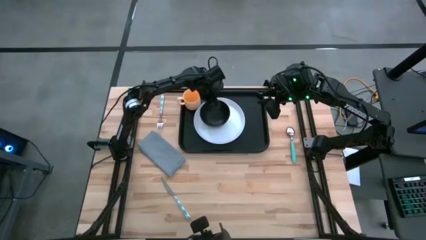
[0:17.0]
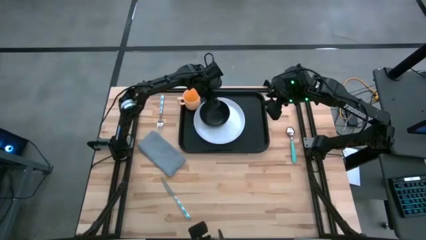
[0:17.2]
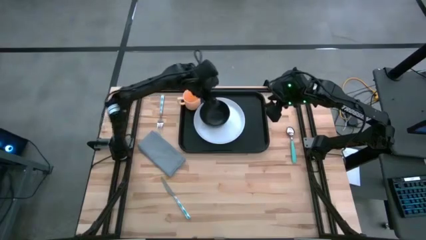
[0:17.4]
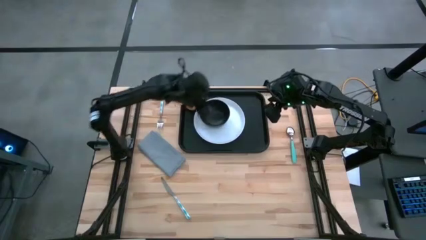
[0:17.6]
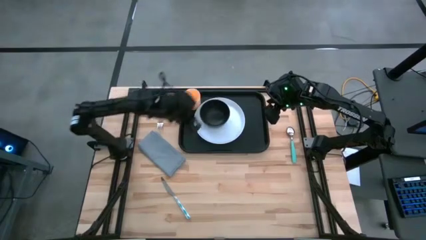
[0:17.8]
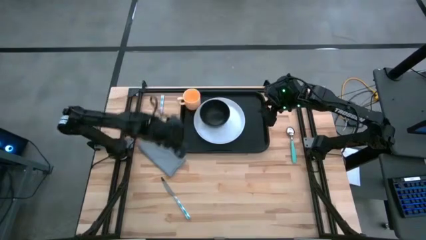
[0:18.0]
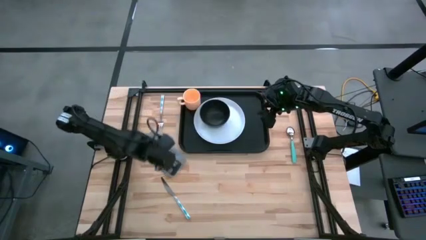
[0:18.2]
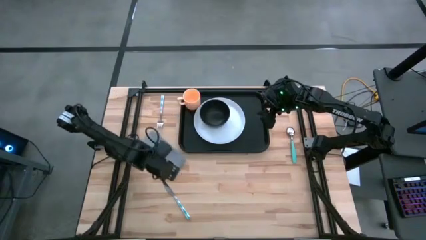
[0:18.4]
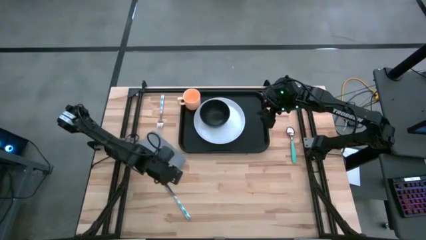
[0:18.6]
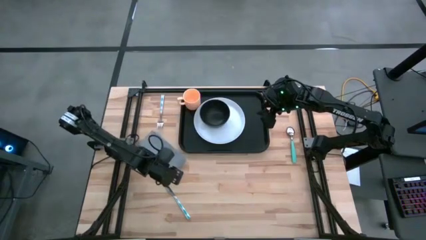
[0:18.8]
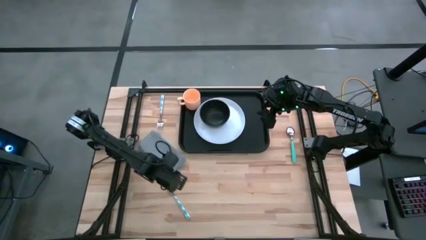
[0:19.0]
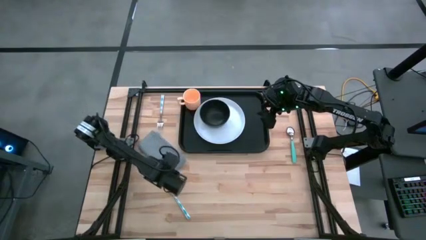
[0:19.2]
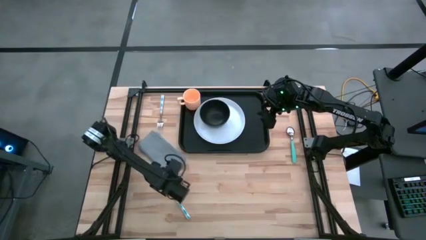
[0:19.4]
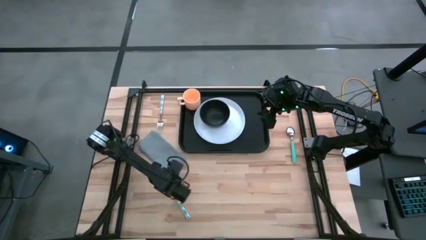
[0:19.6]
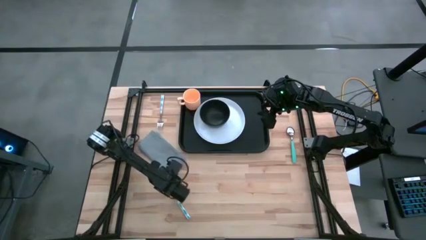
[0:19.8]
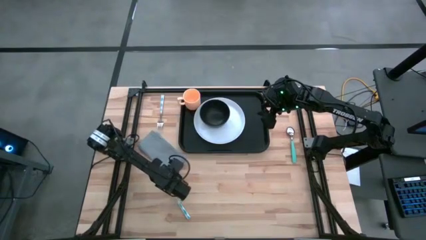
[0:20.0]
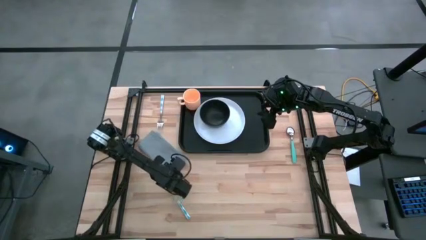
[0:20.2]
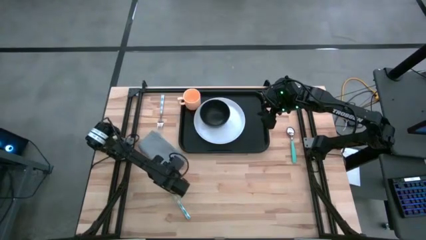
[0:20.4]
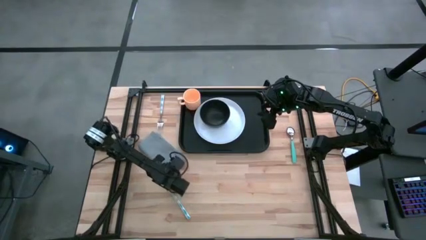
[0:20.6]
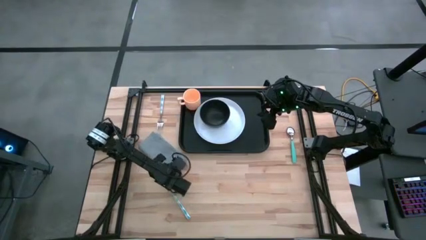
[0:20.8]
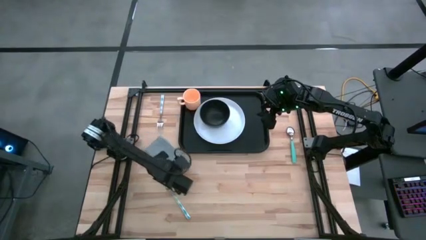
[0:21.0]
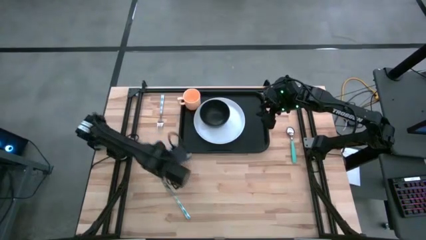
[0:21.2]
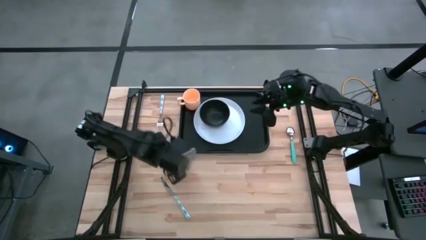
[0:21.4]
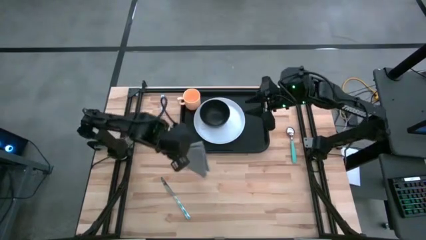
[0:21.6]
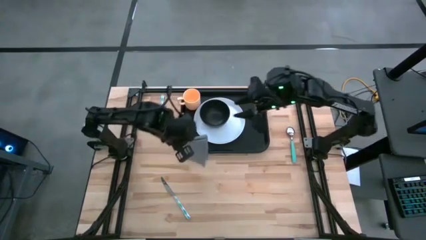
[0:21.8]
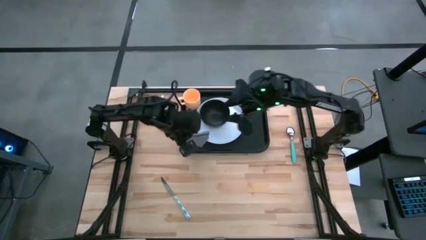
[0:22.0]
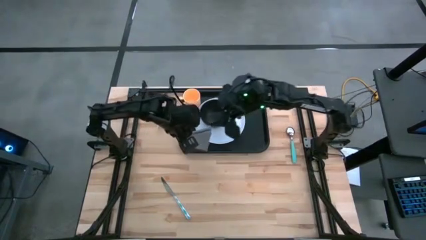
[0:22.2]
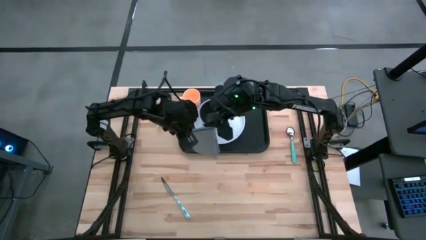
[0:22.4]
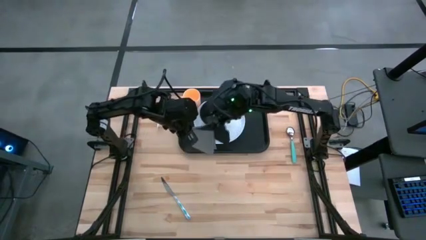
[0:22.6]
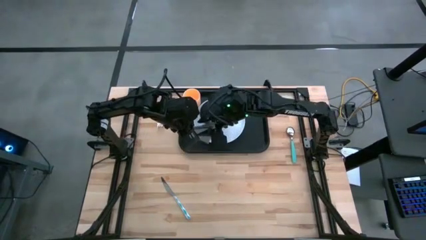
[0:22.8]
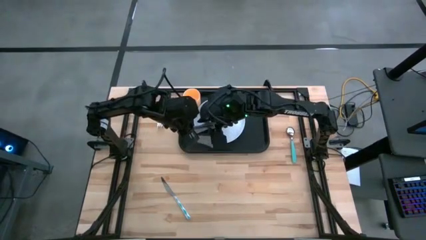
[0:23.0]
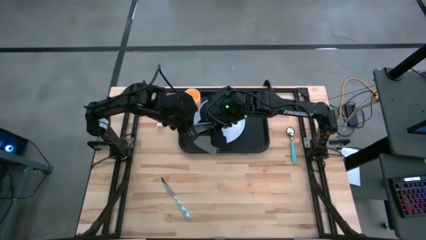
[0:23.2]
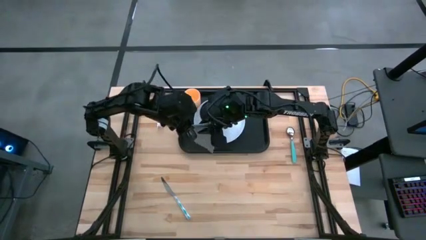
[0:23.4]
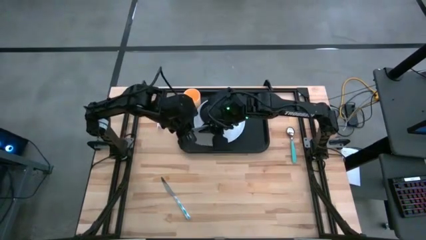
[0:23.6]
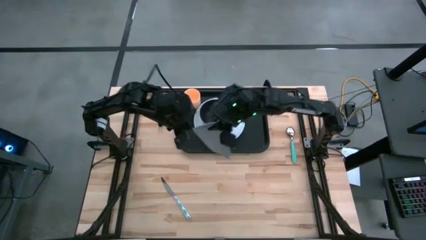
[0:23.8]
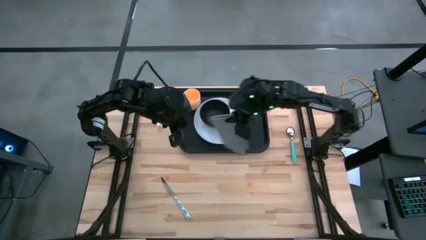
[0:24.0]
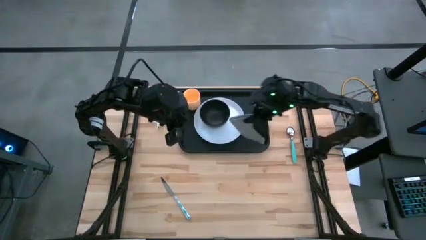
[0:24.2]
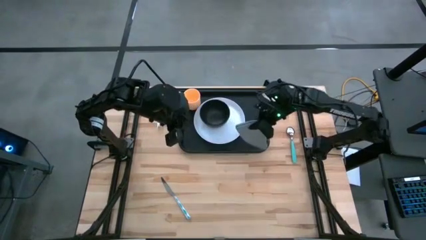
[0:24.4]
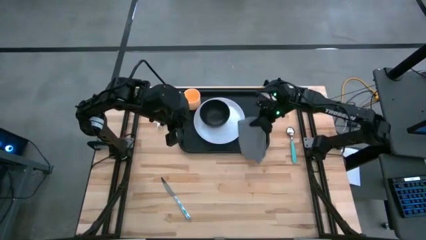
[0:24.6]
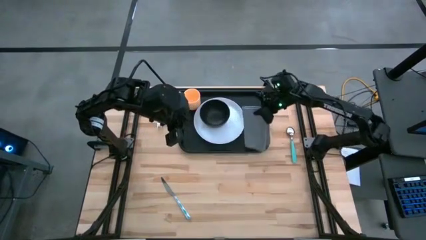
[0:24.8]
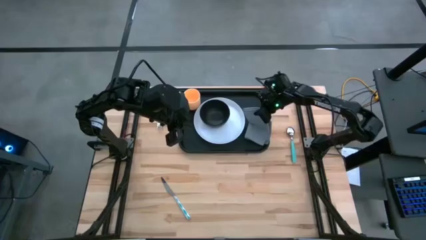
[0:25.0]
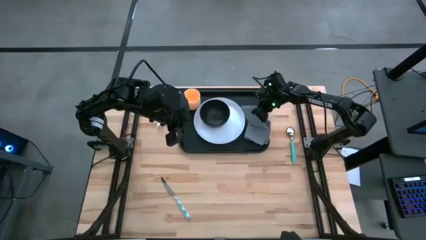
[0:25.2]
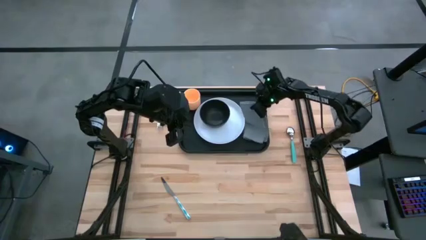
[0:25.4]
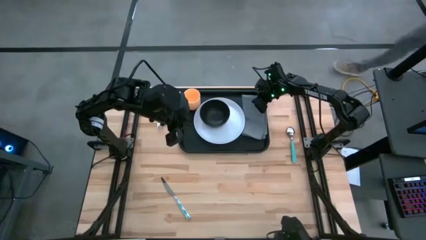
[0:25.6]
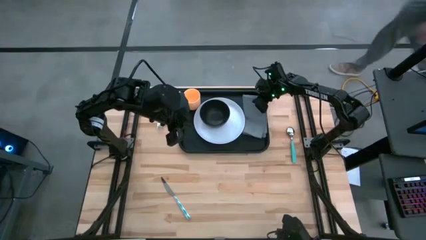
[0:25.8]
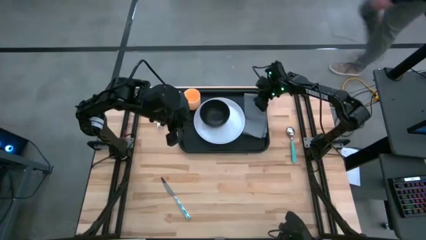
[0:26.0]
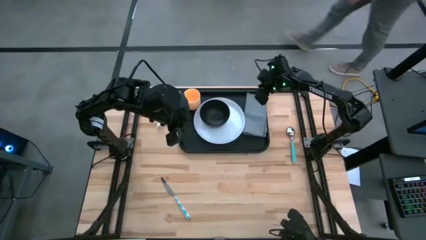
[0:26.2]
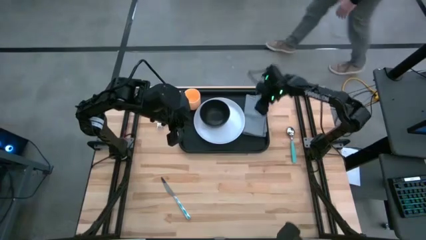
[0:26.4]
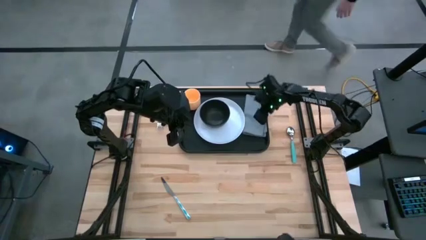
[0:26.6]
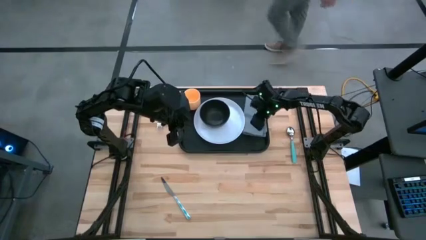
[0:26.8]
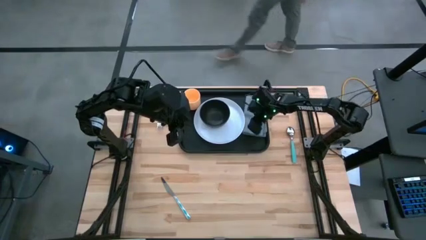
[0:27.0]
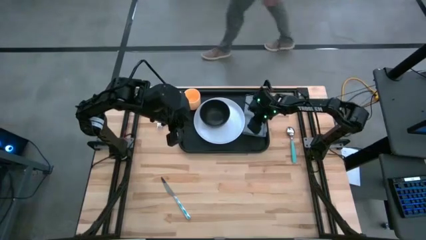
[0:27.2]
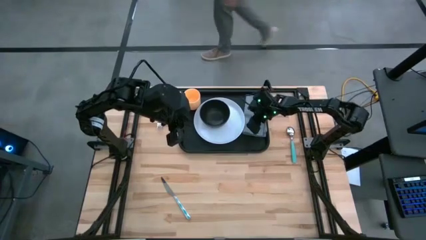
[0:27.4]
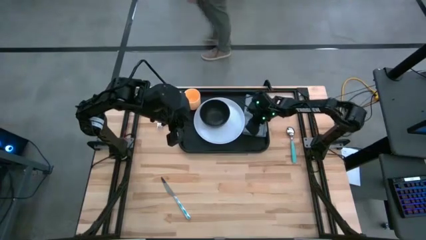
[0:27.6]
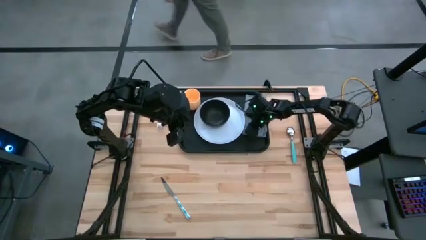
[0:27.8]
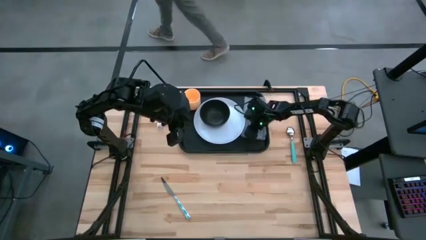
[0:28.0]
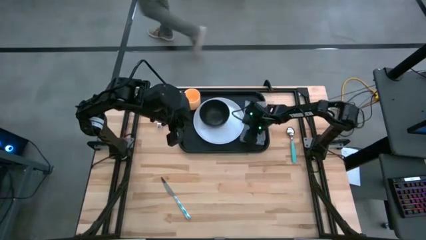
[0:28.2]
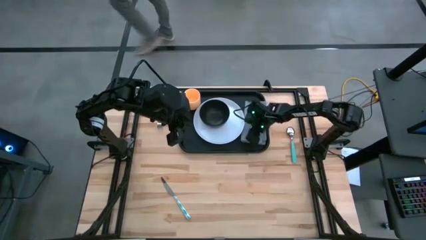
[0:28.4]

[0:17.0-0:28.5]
Task: Set up tray
Put the gray napkin to the right of the white plate on the black tray

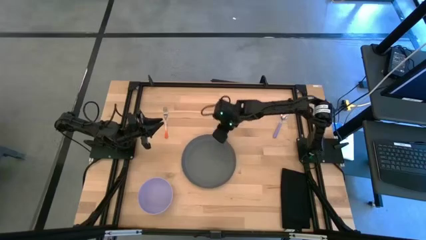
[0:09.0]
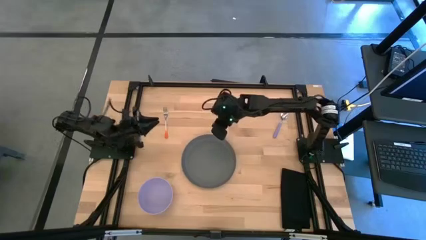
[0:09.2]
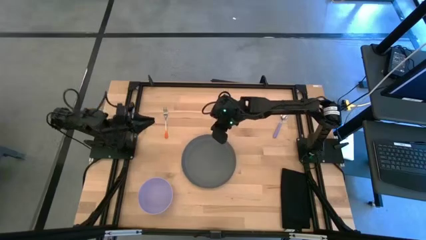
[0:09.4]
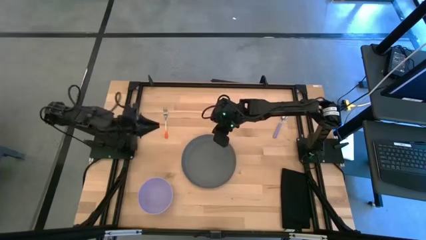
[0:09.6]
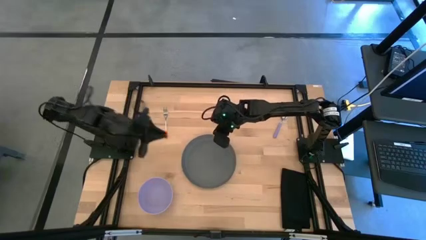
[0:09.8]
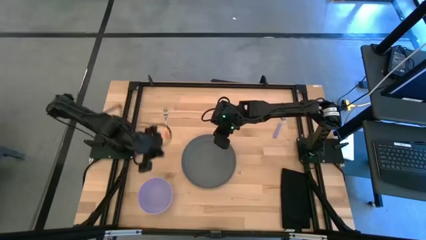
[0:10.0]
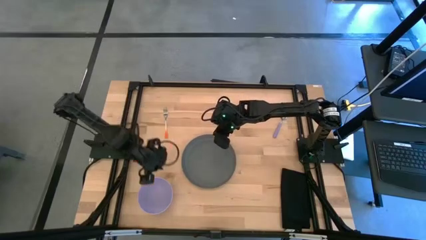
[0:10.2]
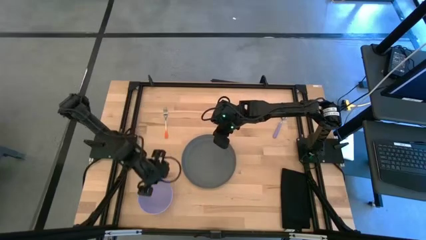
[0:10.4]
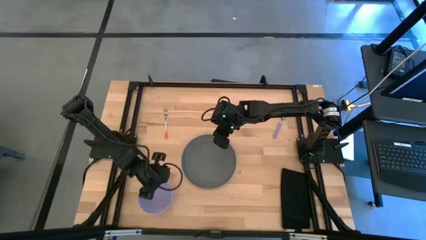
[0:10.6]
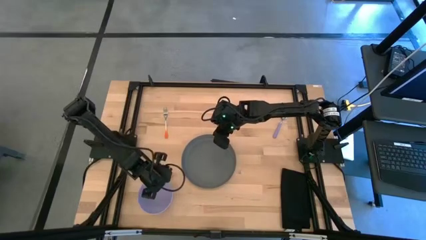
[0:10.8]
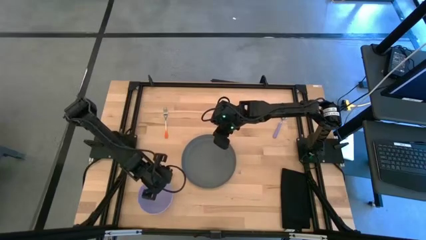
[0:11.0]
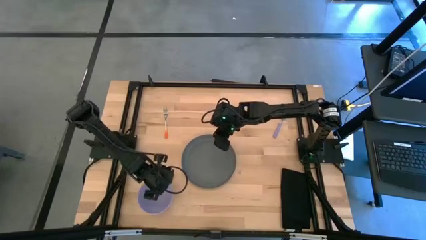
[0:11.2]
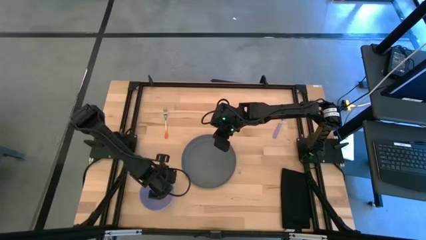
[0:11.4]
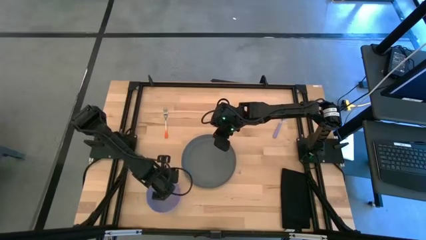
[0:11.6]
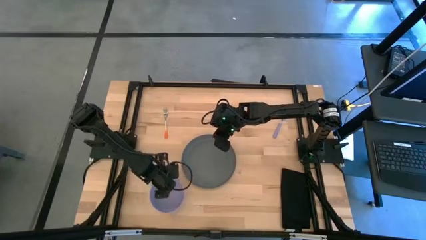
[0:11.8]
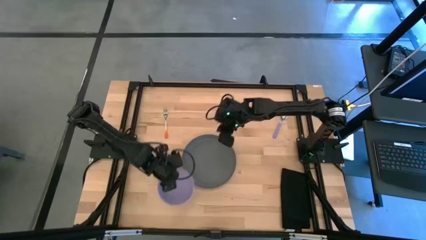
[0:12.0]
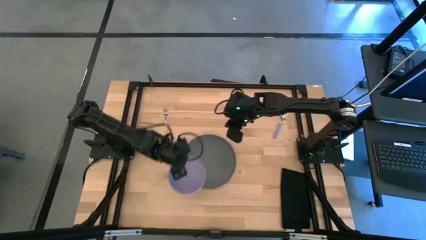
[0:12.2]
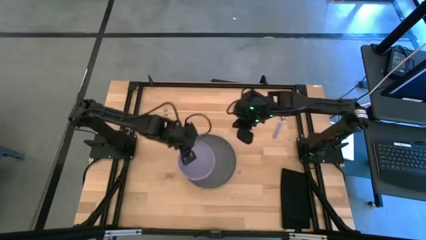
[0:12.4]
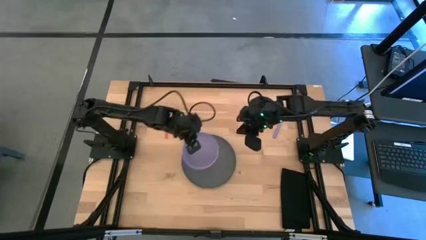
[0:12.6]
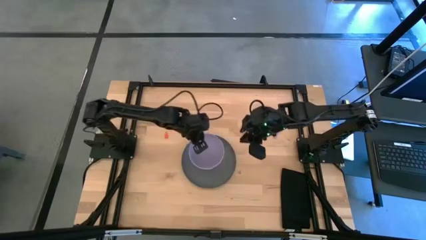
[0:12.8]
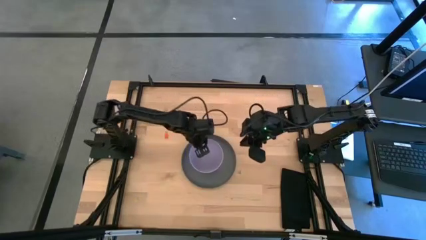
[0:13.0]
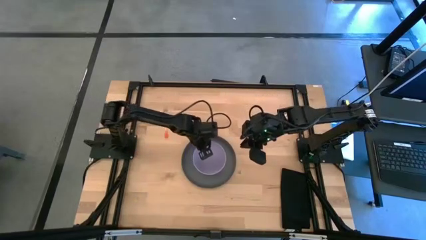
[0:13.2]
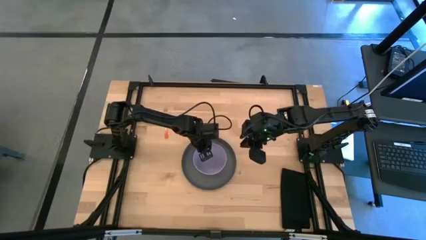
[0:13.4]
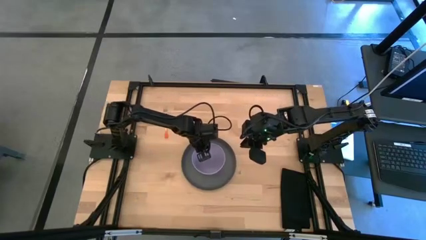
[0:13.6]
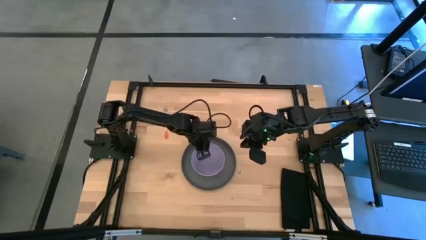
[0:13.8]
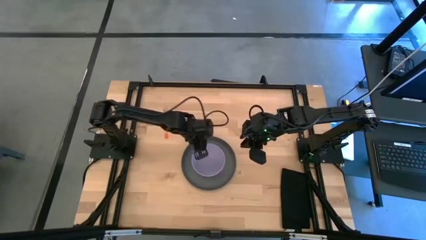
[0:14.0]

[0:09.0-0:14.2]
Task: Set table place
Put the light blue bowl on top of the grey plate
